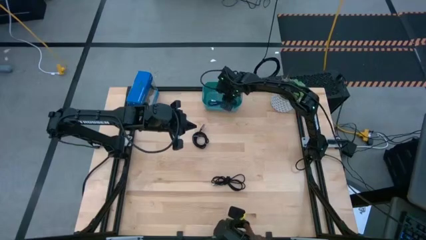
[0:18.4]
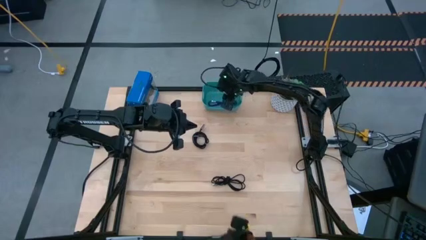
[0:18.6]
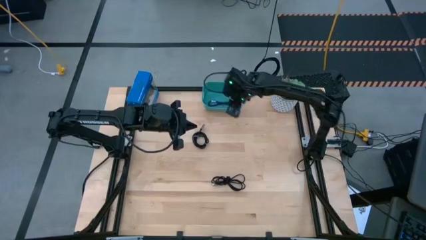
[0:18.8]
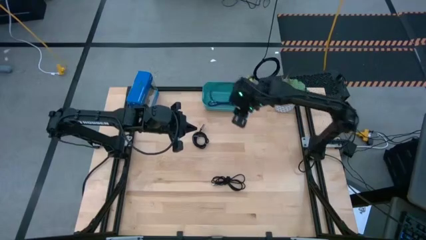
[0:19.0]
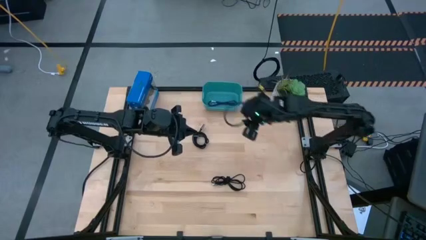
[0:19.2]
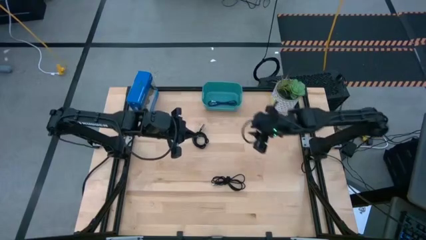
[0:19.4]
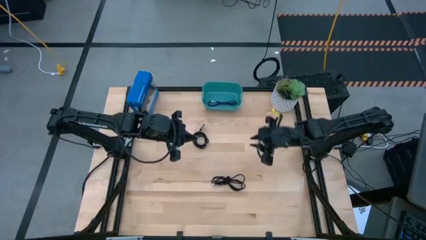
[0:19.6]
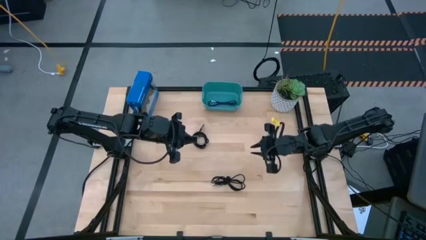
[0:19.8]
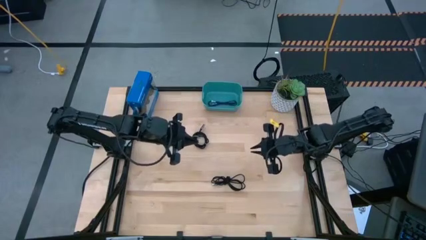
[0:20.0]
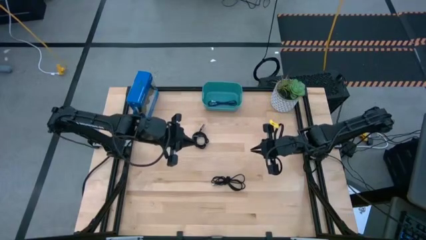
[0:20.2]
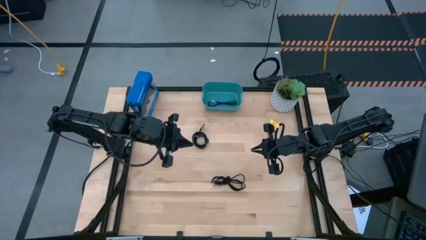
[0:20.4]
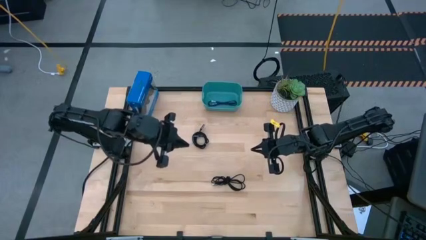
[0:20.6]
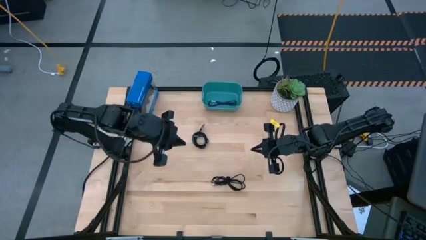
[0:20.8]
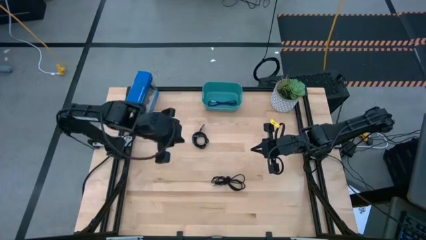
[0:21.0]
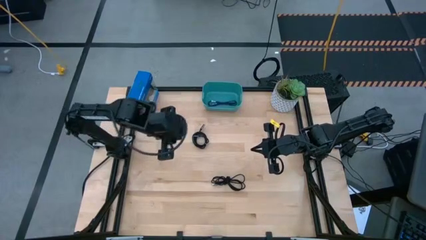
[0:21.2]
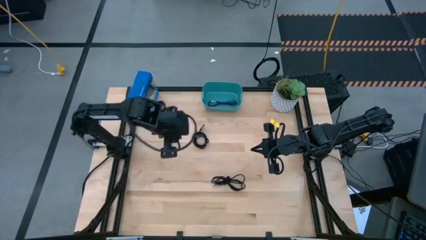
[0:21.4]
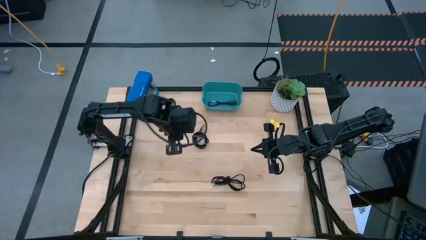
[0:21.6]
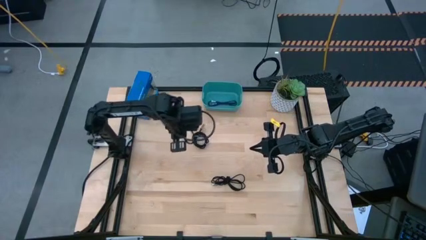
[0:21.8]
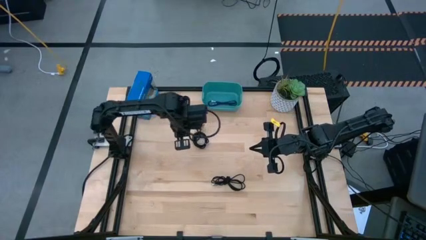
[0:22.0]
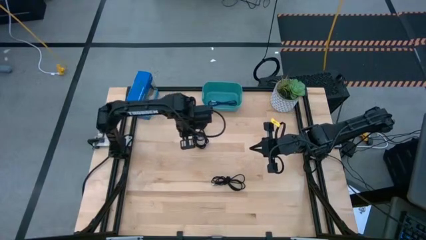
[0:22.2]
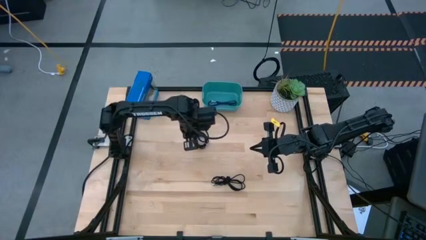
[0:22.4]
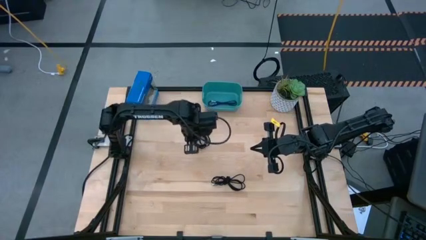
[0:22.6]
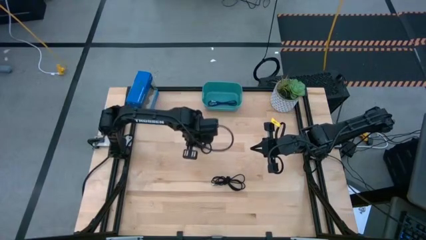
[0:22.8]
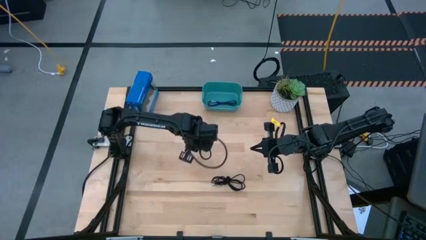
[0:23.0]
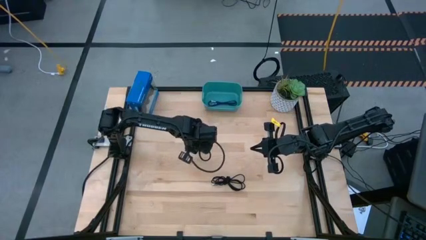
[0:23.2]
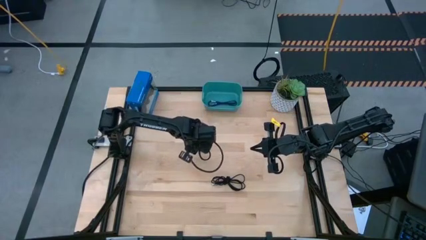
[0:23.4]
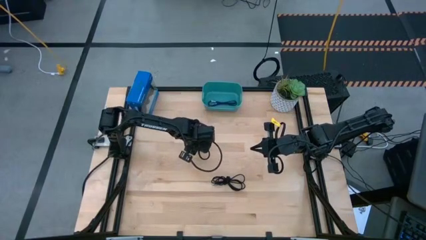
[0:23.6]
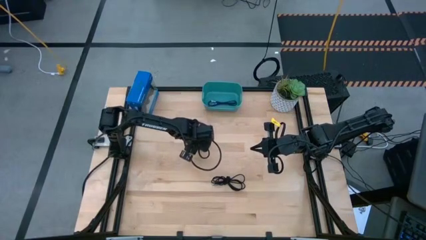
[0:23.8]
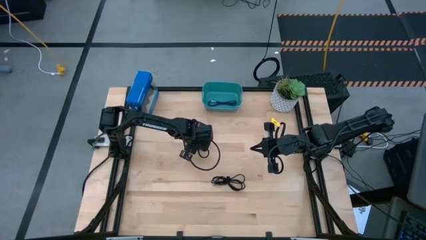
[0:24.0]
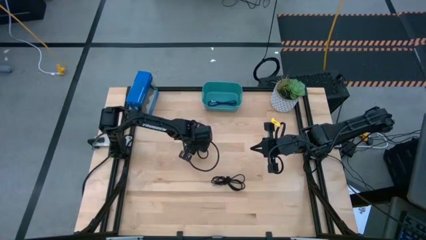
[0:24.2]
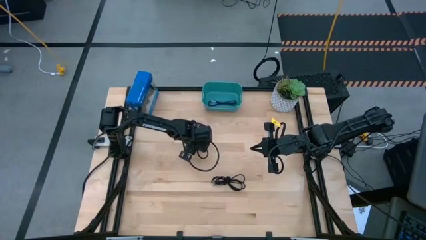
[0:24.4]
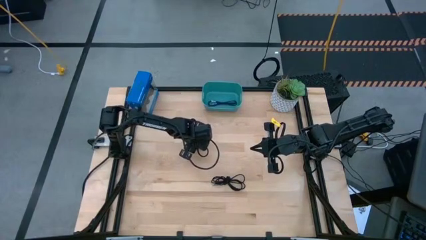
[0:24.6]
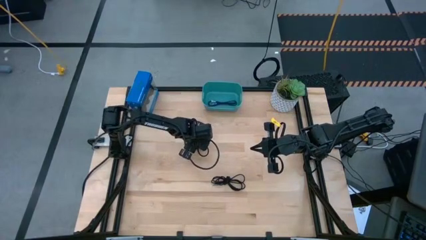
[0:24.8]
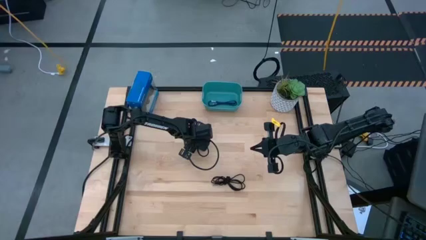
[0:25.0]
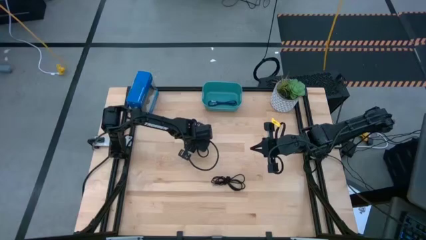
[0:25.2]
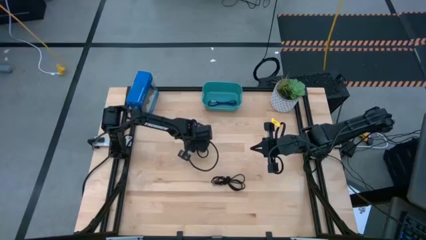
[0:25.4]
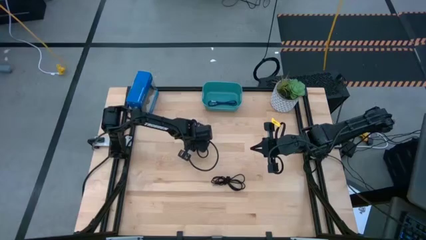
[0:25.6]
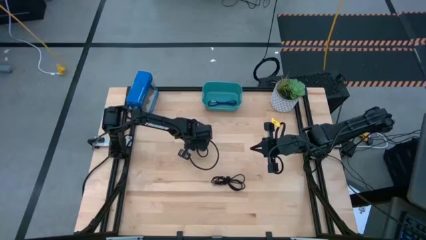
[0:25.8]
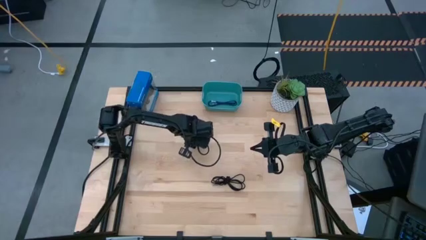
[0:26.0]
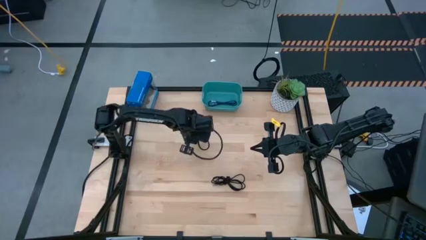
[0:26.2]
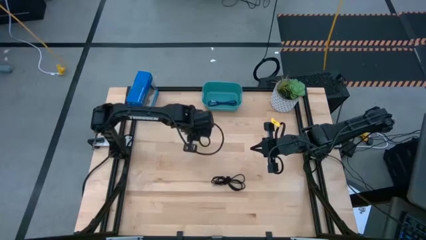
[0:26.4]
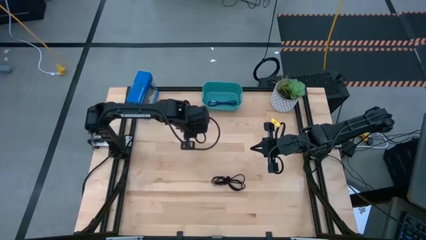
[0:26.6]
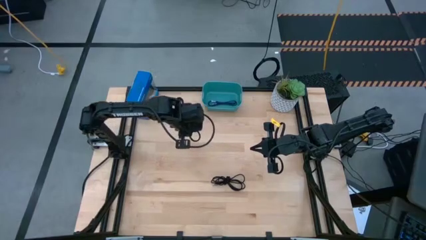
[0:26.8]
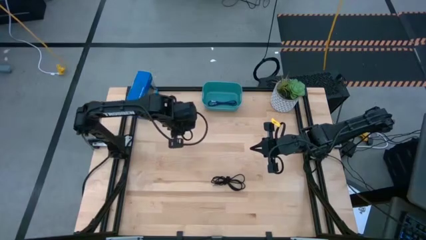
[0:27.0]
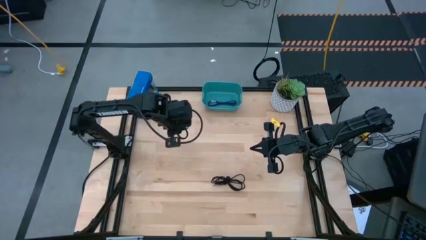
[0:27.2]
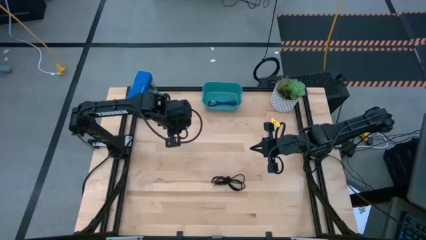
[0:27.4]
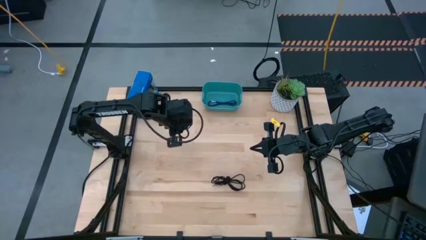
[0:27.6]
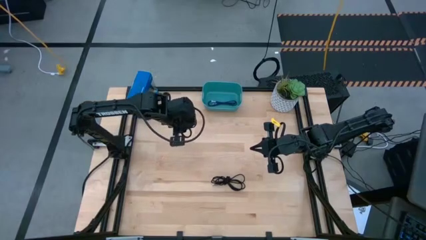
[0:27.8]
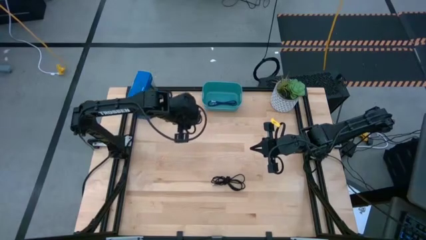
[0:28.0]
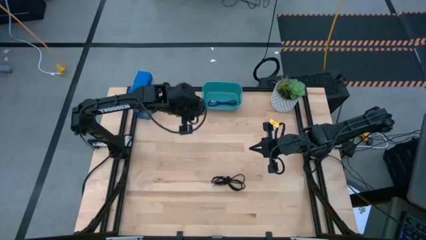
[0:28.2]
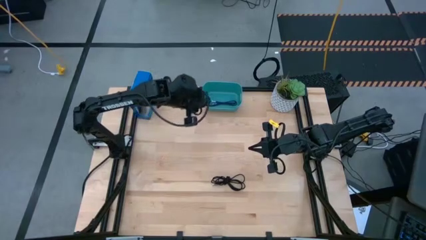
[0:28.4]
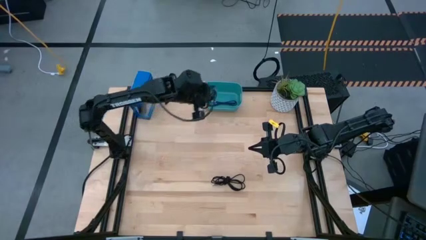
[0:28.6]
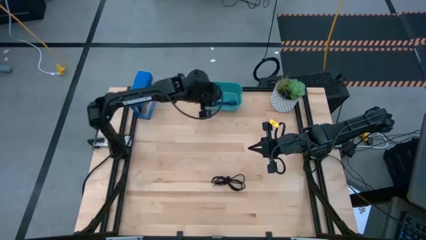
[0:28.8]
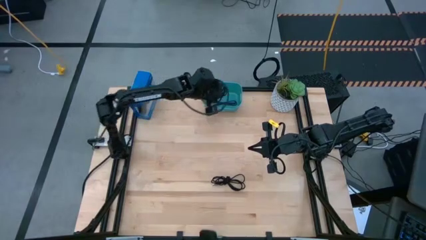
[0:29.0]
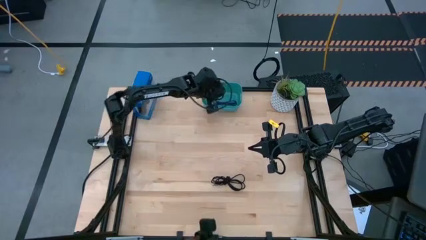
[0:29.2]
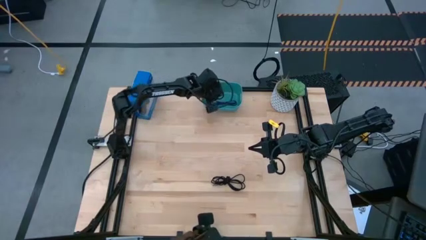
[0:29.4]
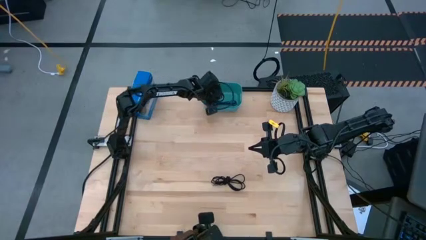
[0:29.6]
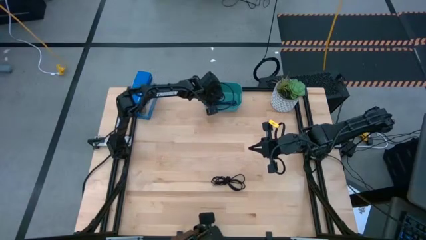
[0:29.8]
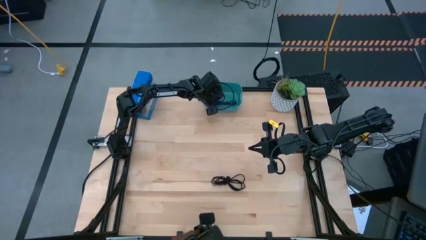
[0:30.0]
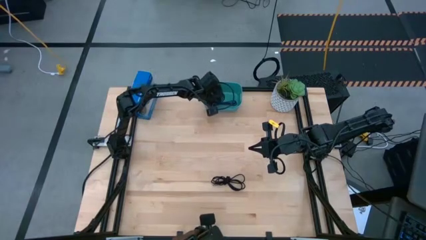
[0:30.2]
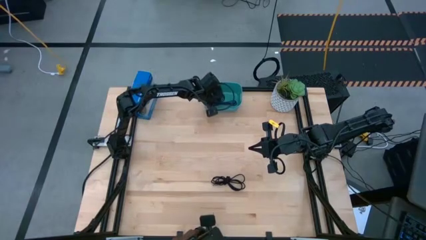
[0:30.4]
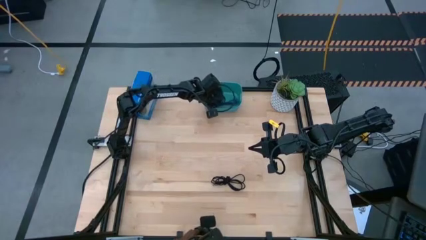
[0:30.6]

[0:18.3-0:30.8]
Task: Pick and place USB-C Cables
Put the top black charger cable into the blue bin
